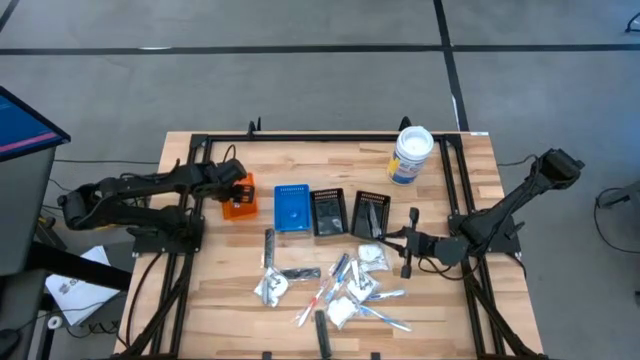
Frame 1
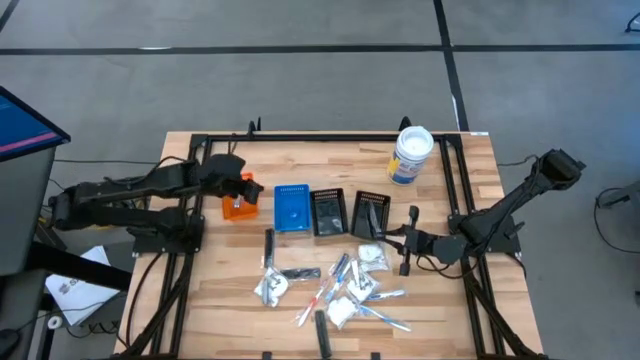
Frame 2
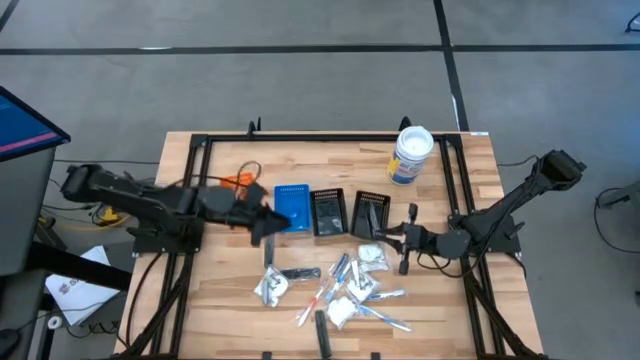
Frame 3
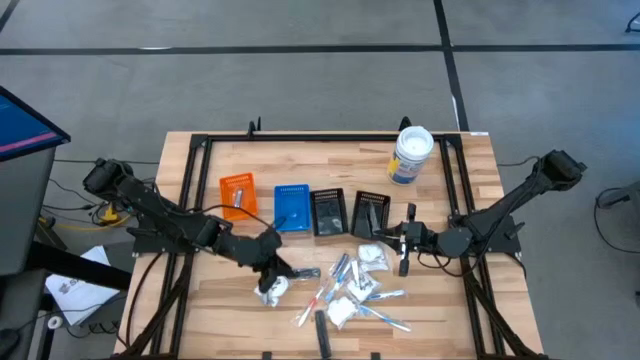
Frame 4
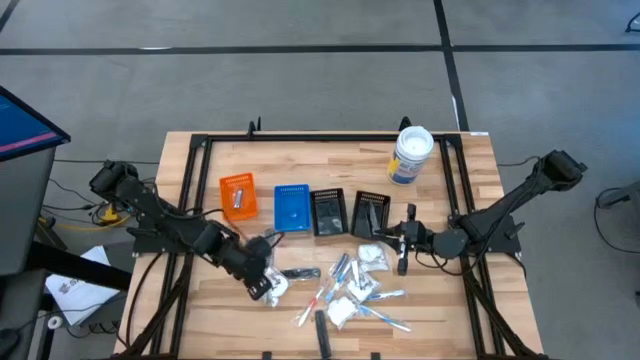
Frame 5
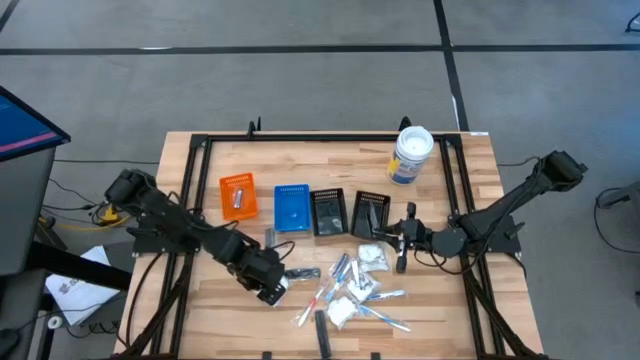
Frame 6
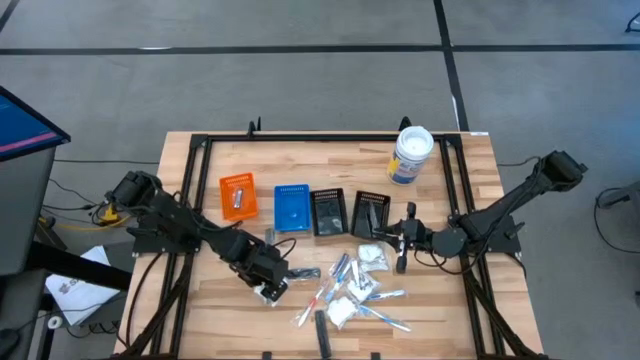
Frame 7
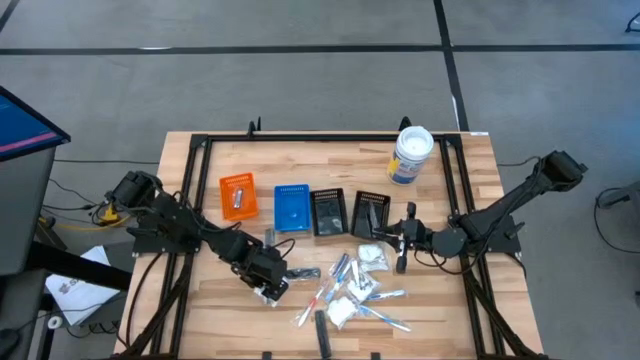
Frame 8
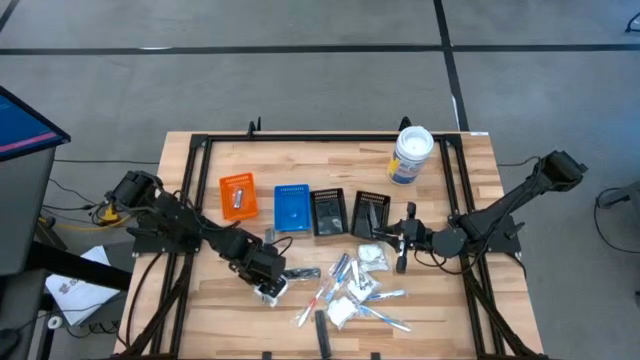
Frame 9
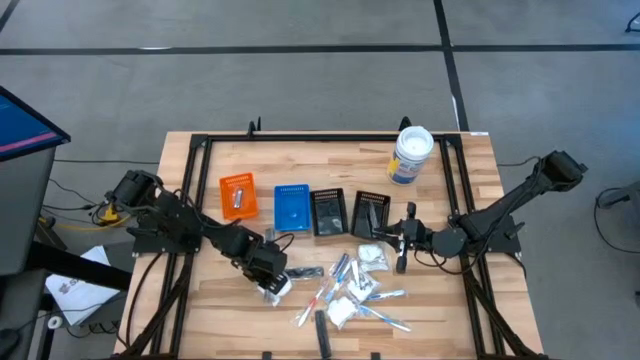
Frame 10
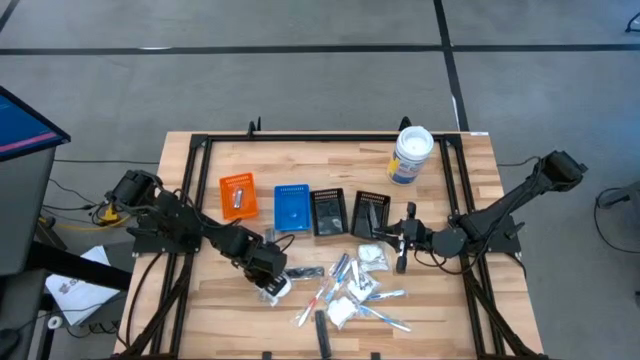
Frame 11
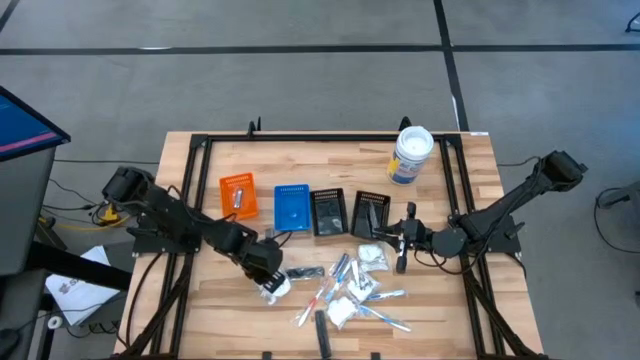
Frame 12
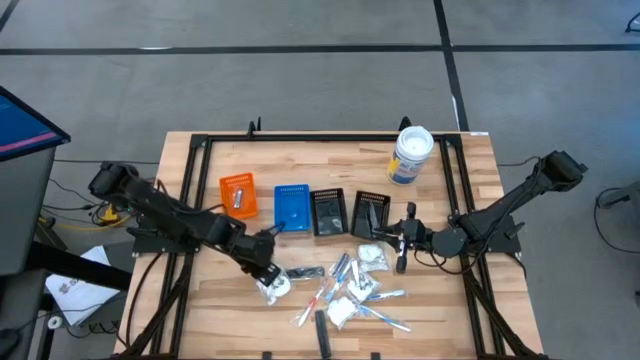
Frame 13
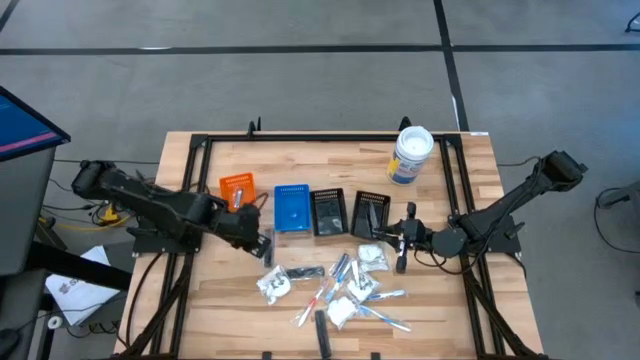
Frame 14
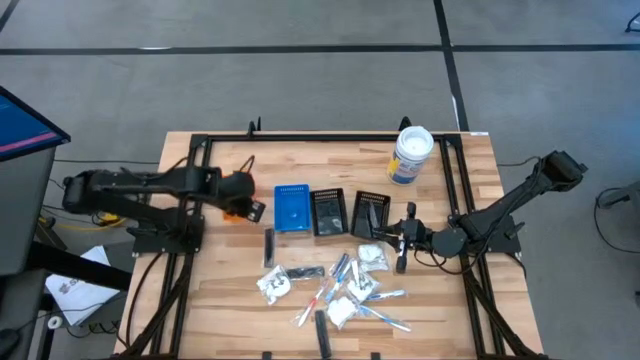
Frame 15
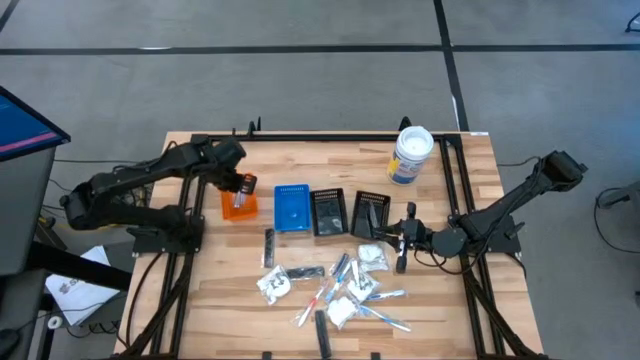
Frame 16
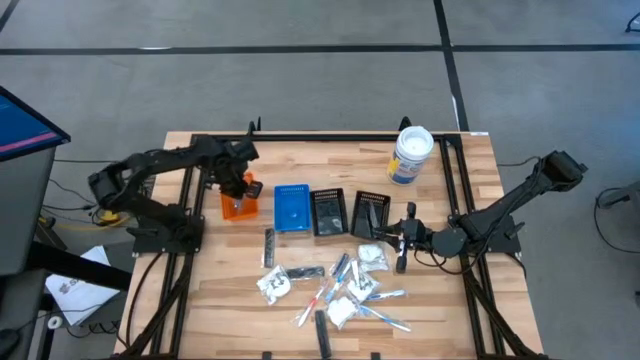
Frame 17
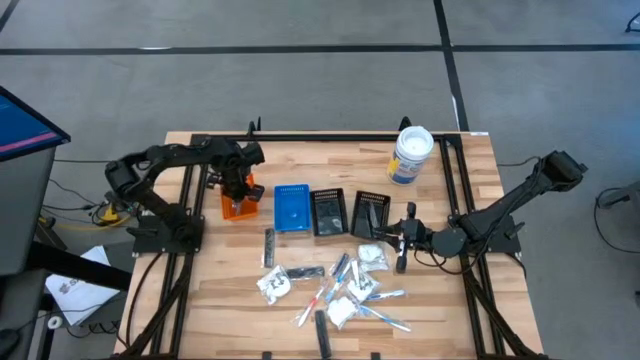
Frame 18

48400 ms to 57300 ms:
Task: Pick & Place Travel size toiletries
Put the nail clippers into the orange bin

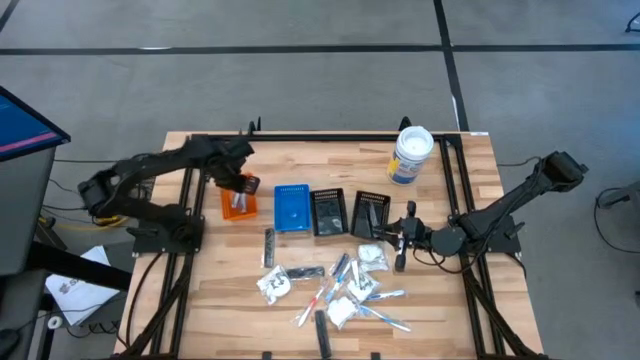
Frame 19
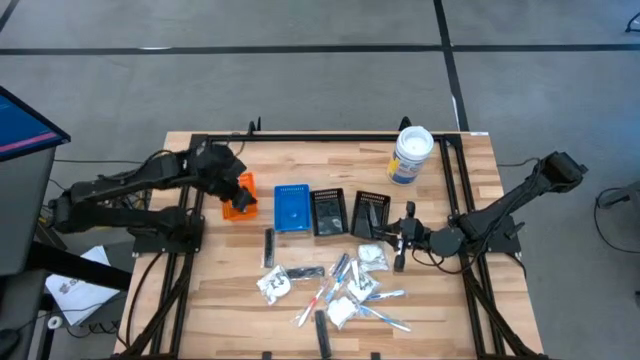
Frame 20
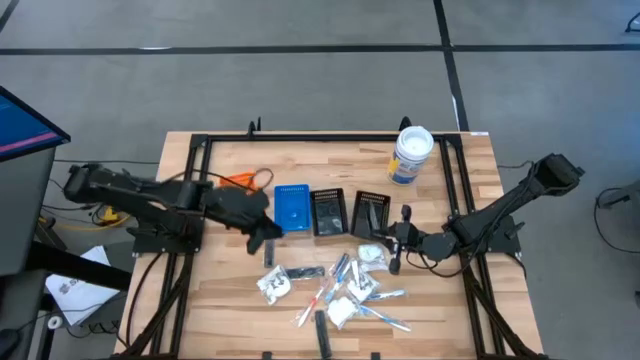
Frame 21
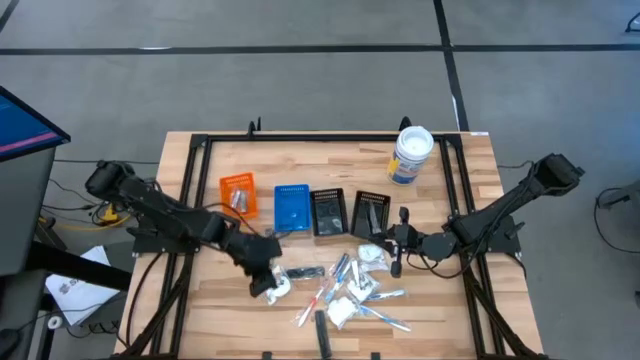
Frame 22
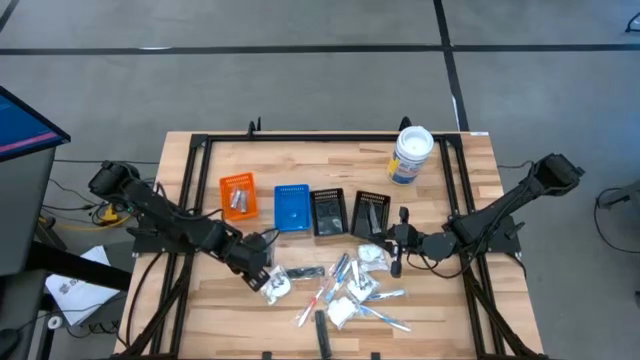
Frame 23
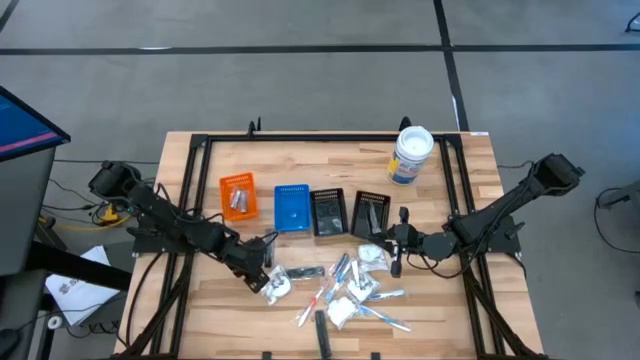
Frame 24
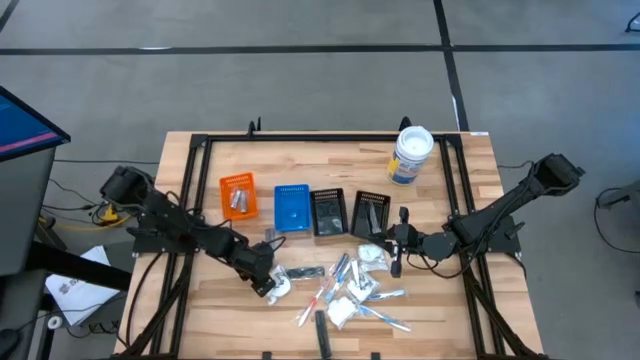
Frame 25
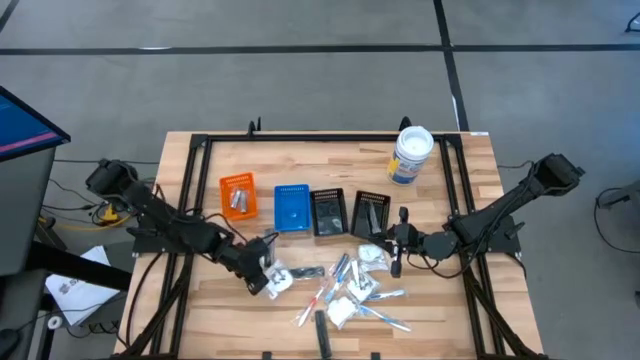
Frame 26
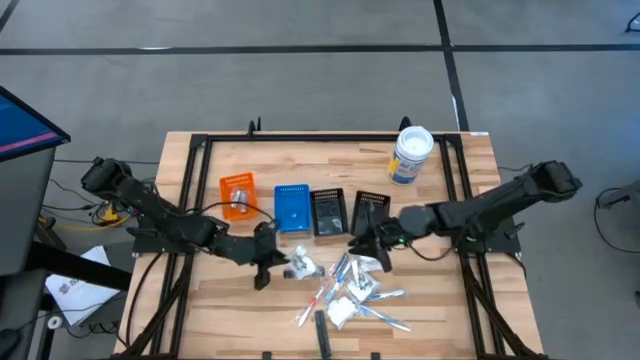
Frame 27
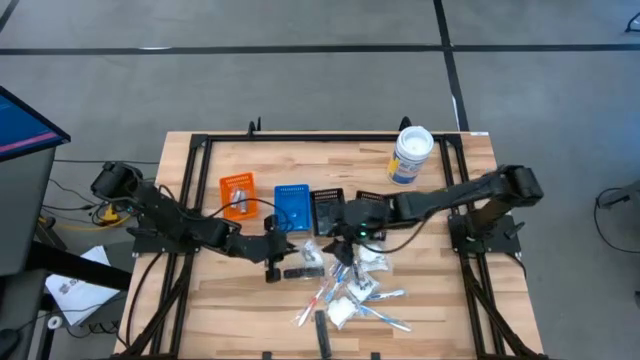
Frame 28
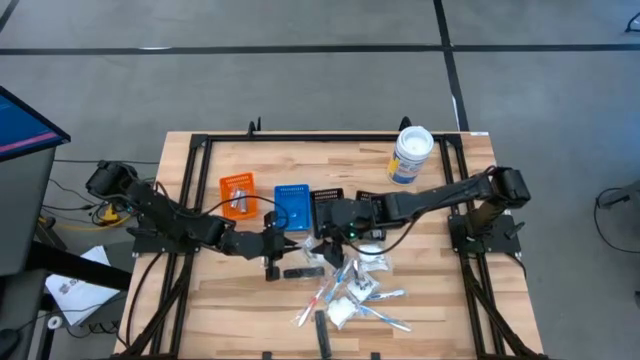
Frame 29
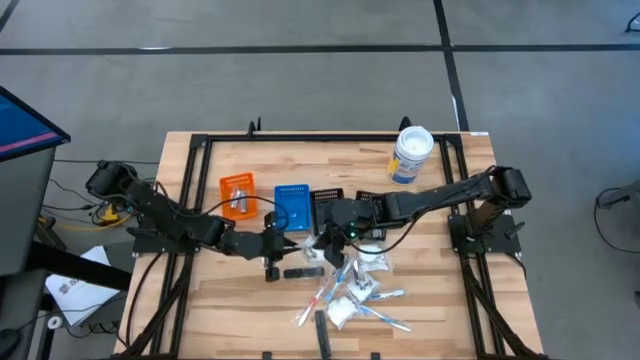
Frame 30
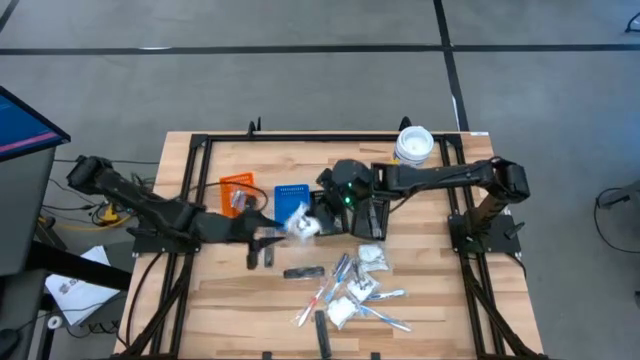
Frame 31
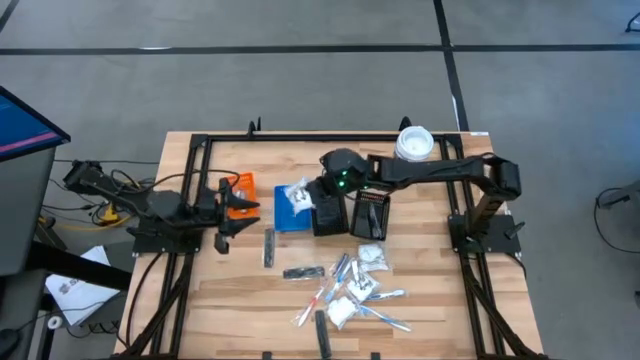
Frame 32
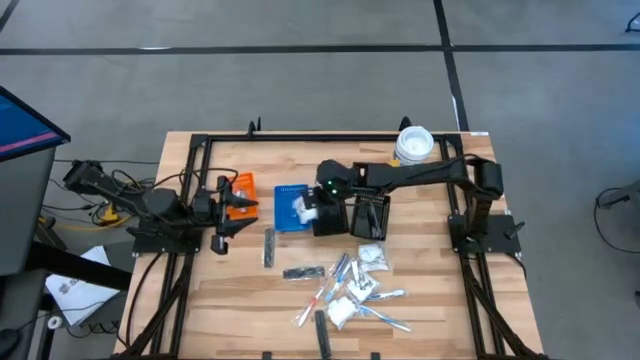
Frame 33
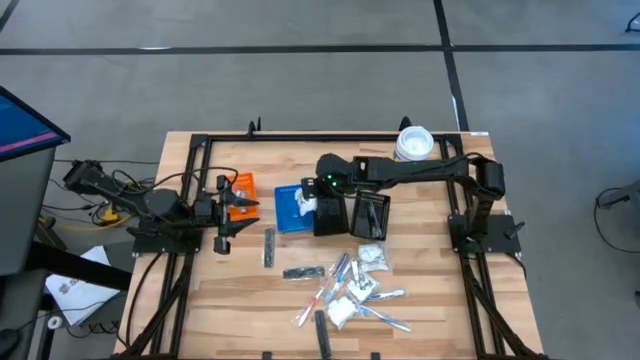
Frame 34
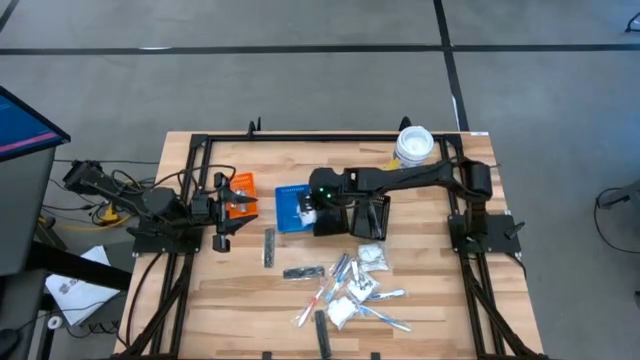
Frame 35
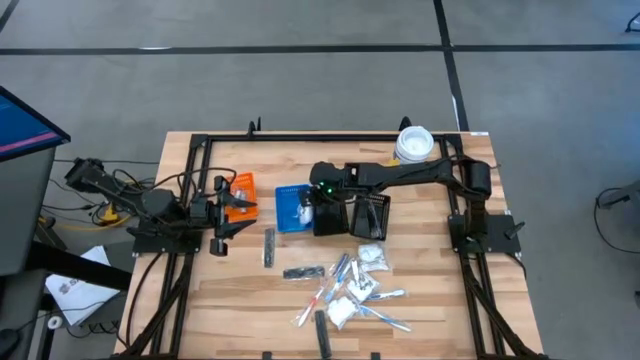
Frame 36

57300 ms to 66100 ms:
Put the pack of cotton buds into the blue bin

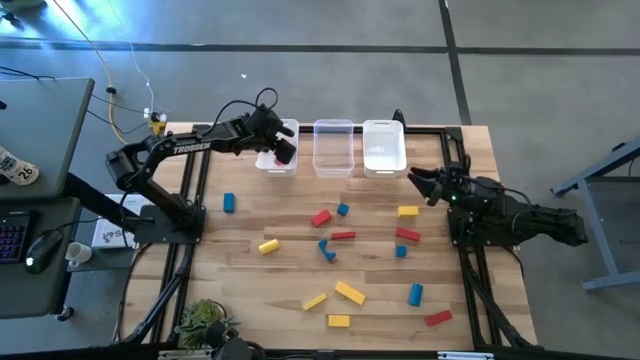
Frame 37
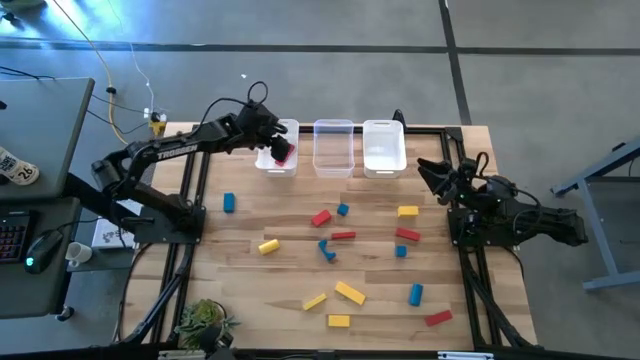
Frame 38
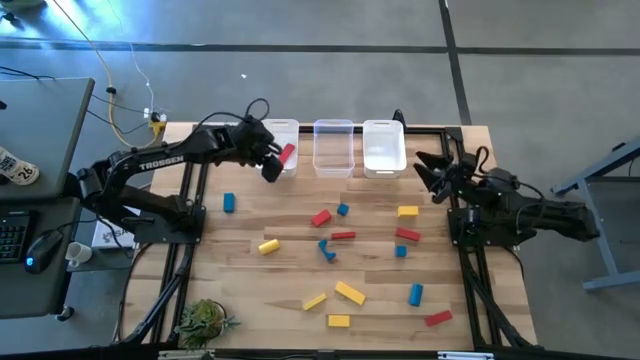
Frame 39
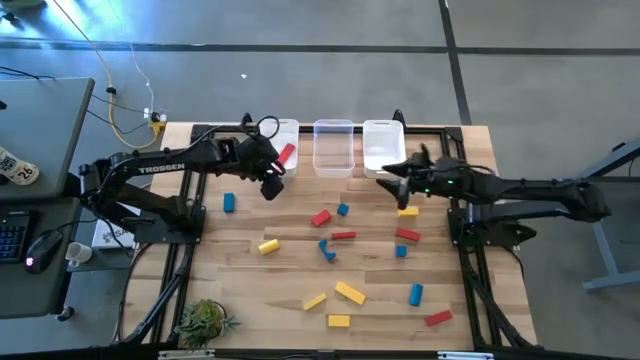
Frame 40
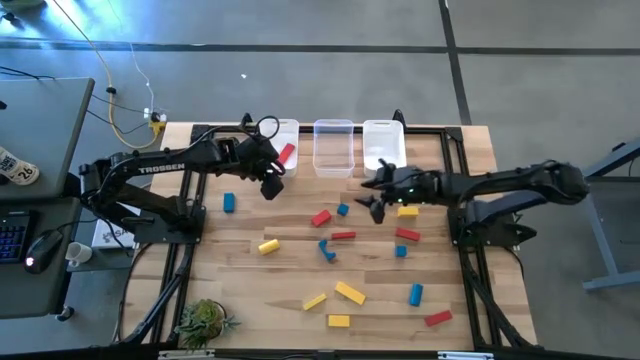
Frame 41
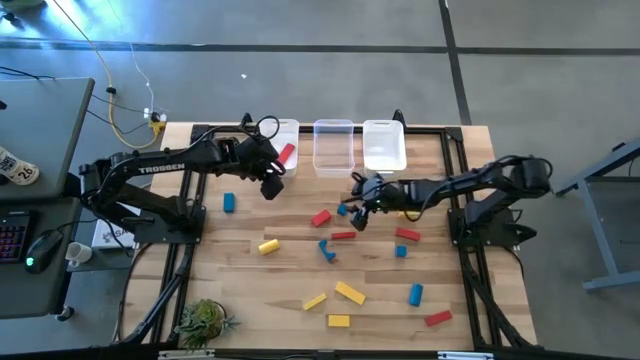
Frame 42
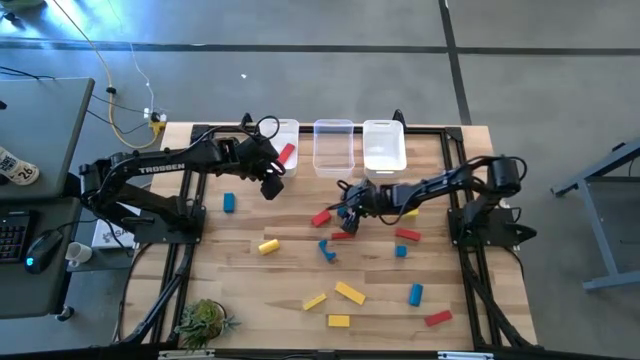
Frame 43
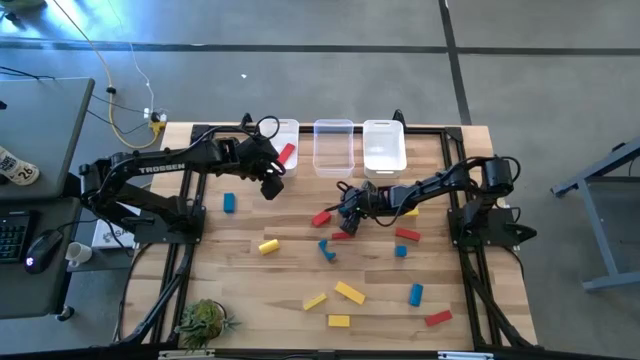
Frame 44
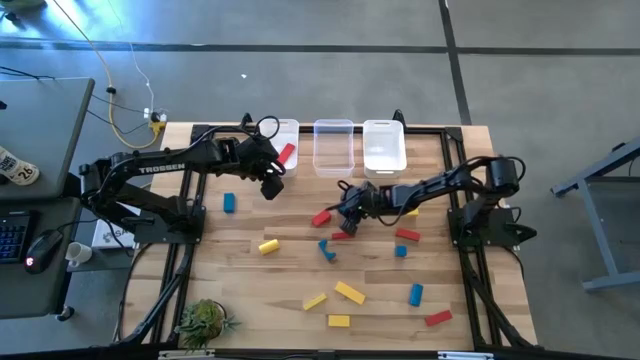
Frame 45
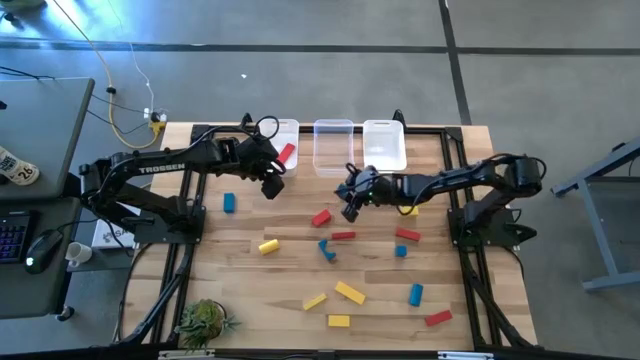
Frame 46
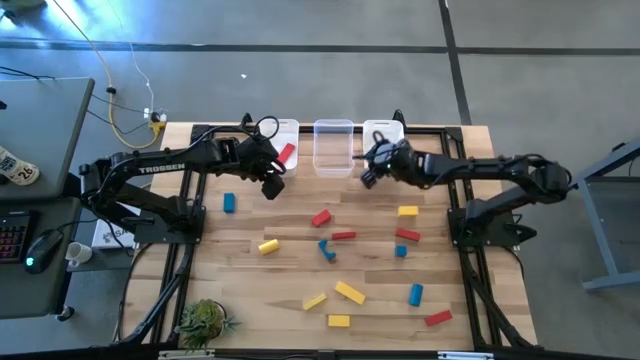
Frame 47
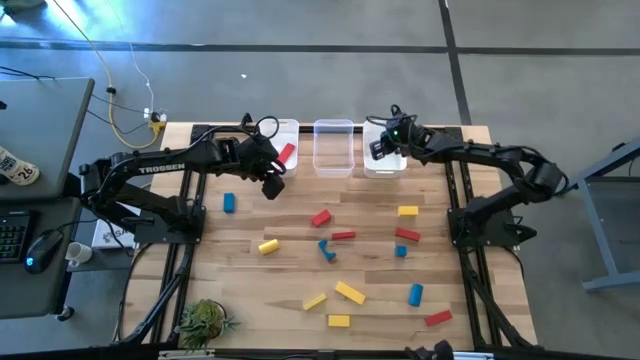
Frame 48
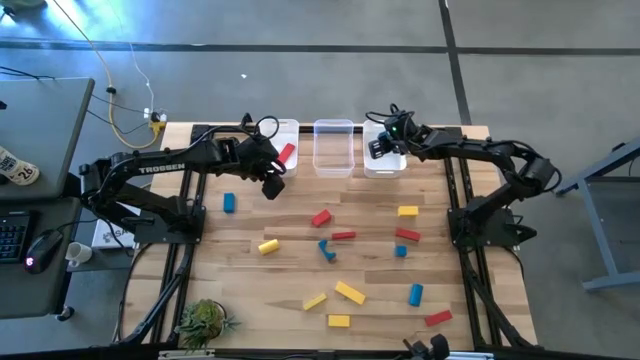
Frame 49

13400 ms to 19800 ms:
Task: Sort & place blocks by color
Put the blue block into the right white bin
